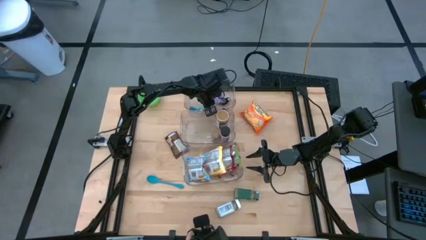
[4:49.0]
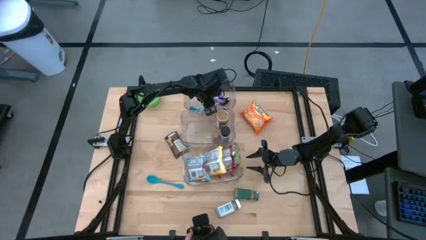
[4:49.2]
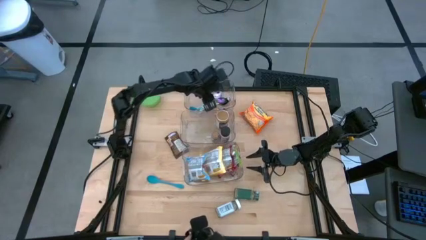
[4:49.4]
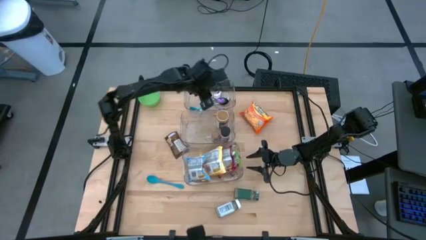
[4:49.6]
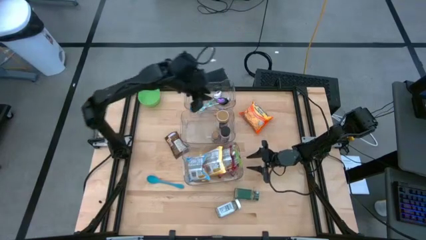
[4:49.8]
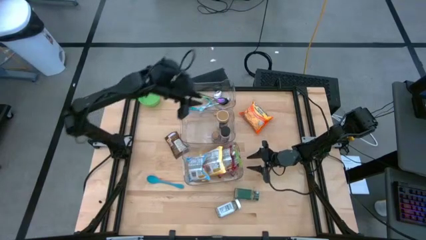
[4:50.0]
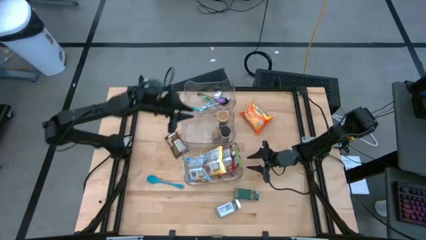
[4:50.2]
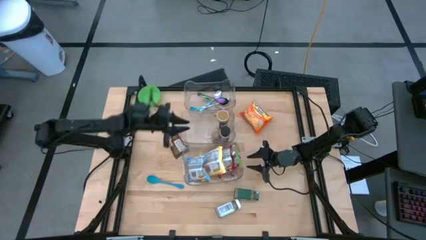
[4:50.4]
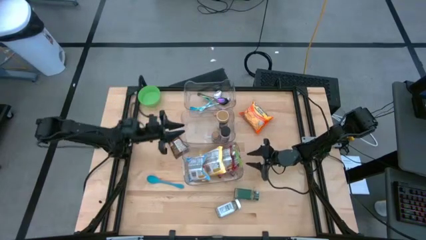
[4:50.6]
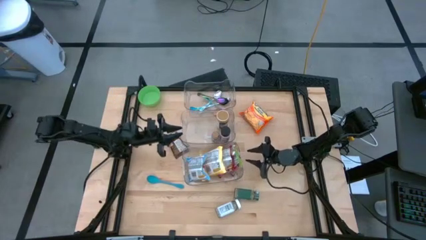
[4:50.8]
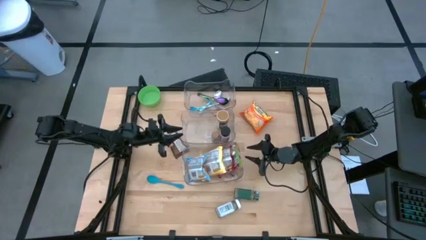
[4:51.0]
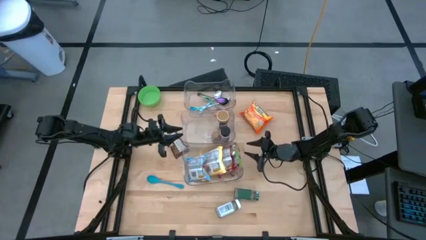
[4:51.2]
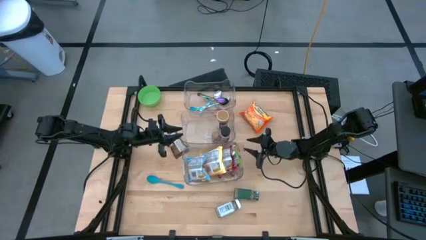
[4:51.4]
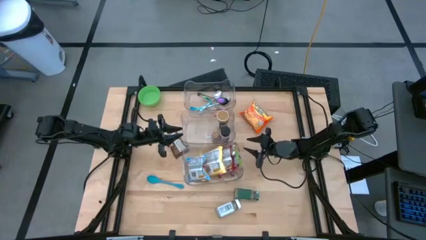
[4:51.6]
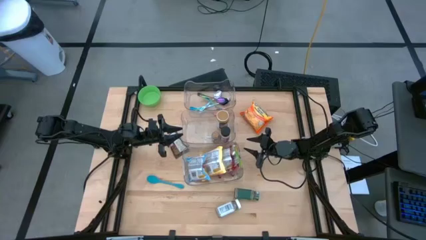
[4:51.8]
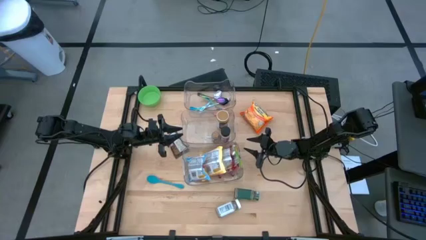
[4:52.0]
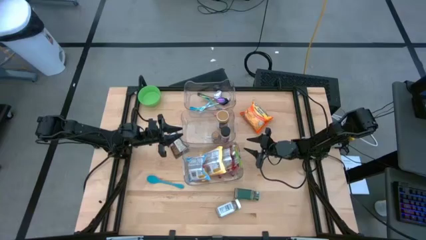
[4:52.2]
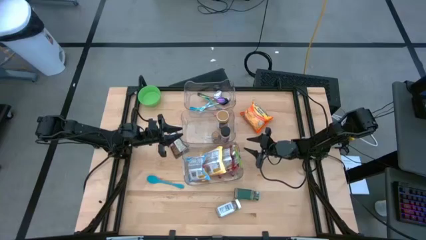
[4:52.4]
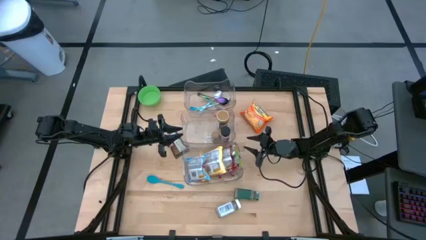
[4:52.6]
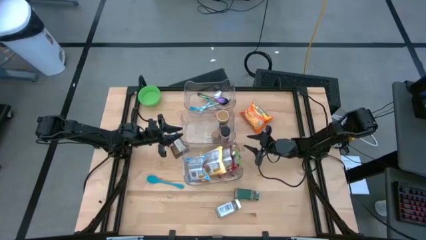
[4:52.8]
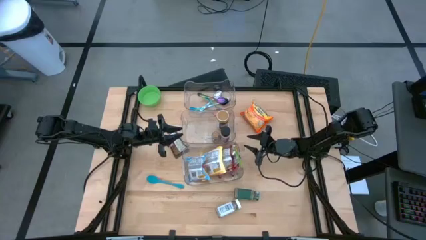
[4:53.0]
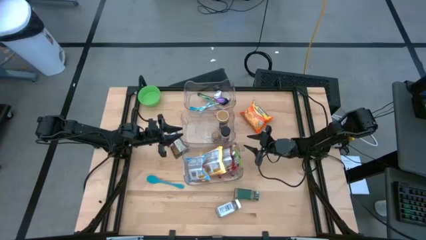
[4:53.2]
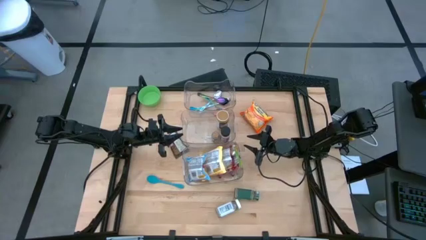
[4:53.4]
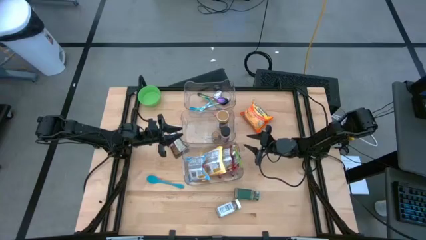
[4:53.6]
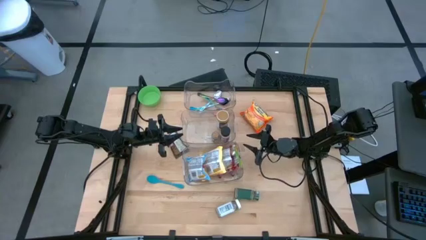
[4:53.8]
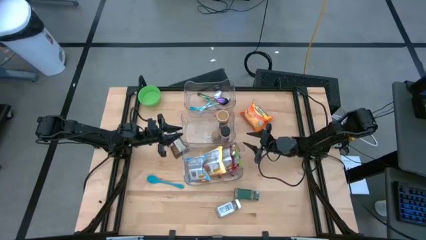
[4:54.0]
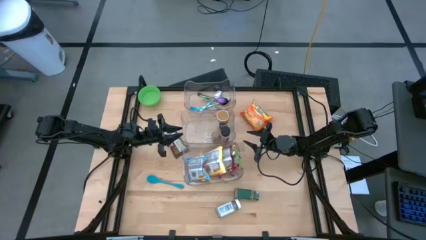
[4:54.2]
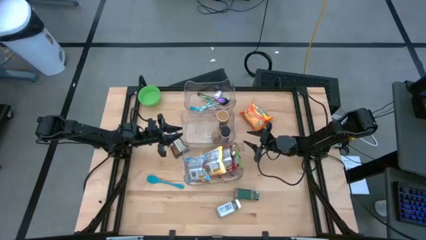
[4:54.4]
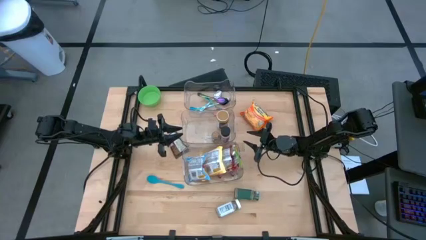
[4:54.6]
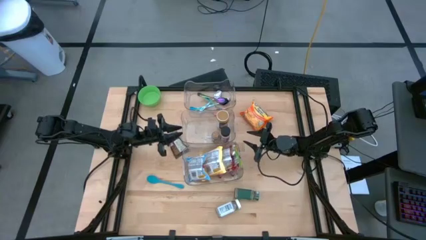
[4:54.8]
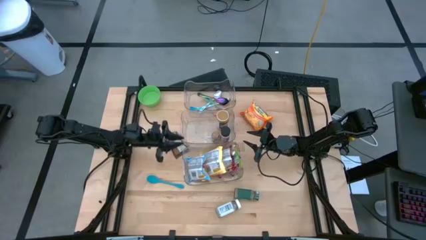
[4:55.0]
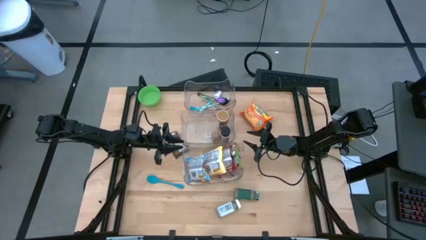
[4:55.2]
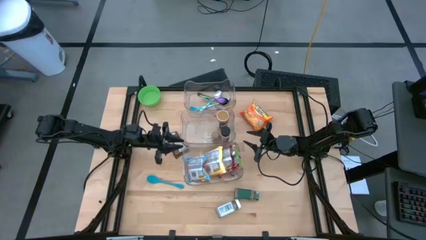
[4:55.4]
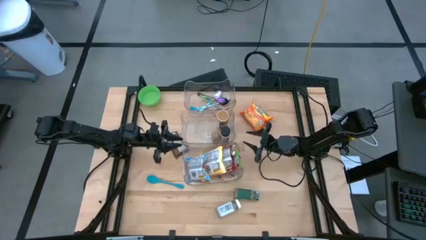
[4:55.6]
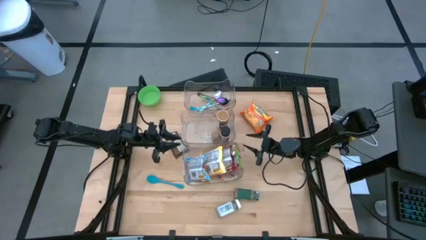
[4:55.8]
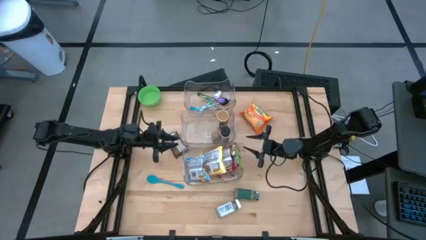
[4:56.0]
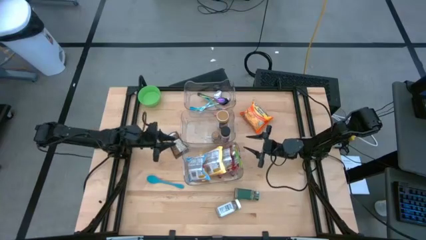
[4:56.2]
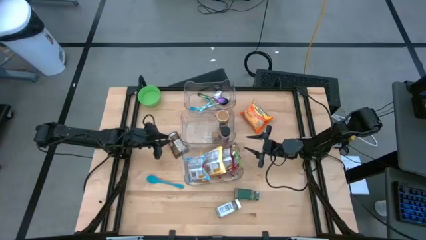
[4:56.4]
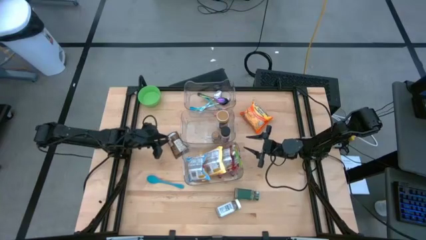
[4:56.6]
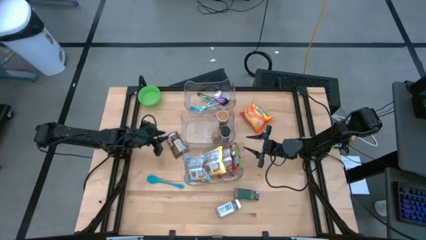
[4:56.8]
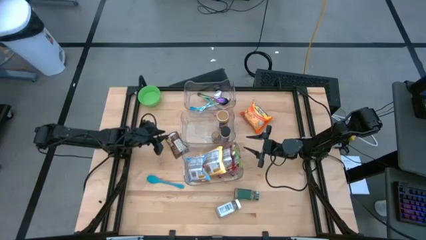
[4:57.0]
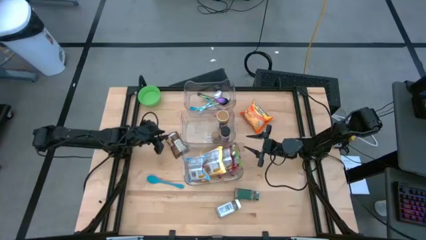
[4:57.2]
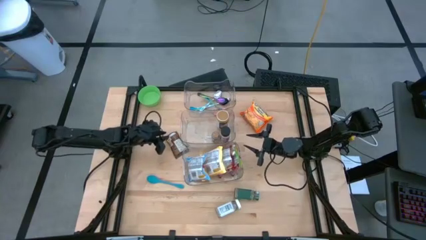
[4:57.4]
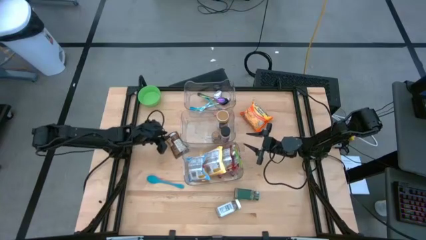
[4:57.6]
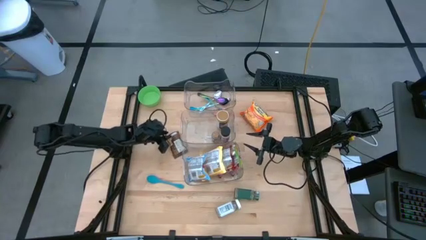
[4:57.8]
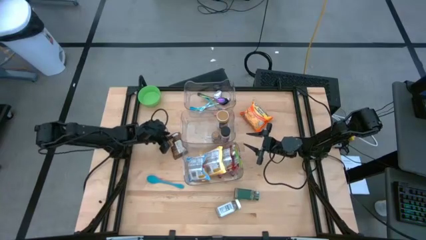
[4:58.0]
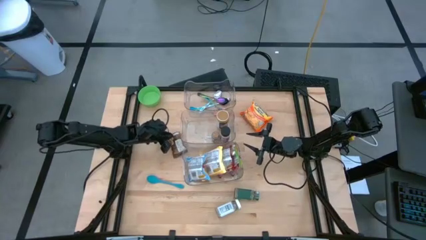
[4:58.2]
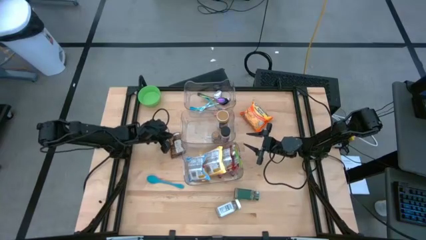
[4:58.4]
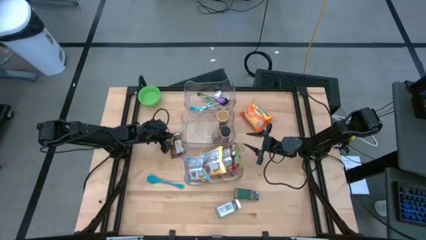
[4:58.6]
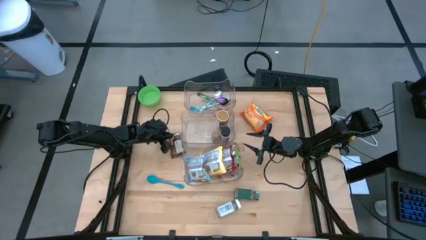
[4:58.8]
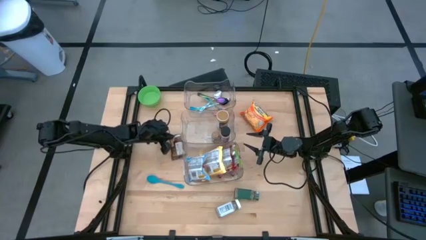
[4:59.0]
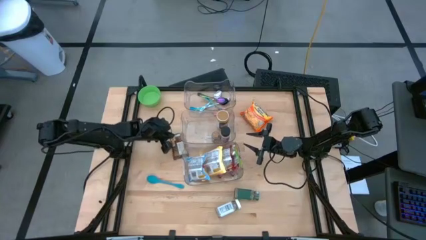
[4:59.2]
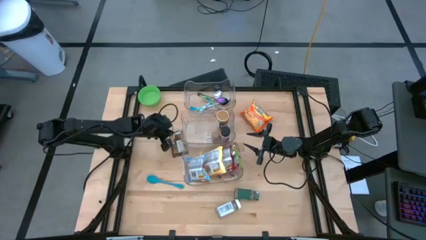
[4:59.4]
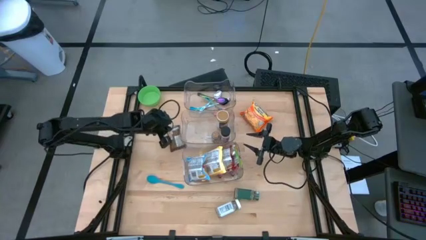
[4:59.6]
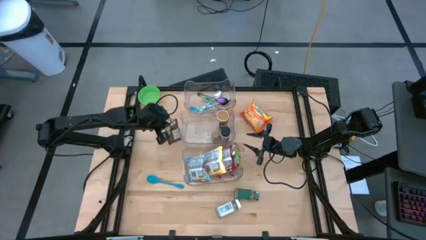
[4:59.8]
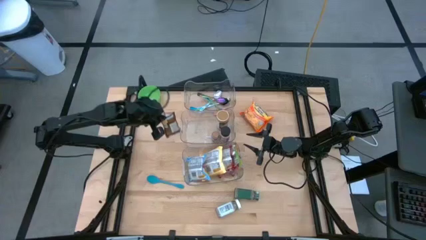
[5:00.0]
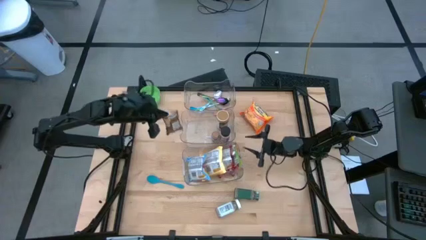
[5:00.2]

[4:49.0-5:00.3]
Task: Pick & Place Food Item
Put the orange seasoning packet into the middle transparent bin

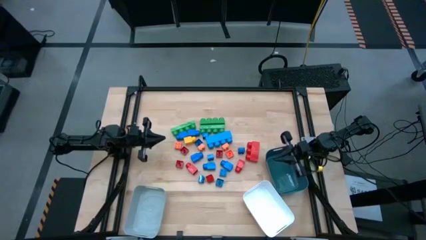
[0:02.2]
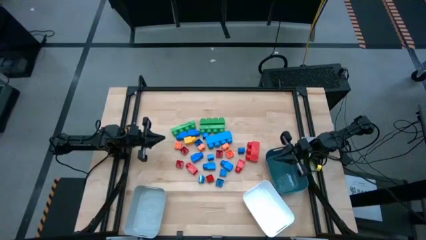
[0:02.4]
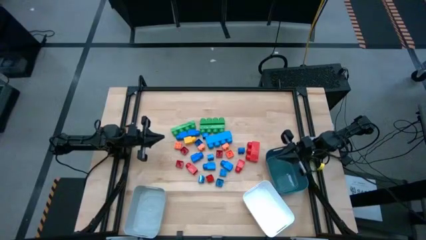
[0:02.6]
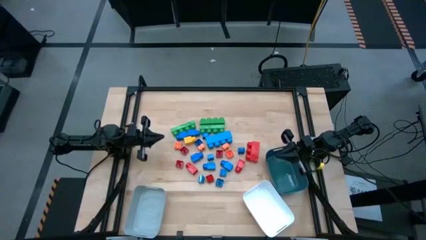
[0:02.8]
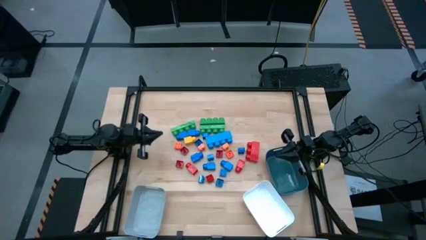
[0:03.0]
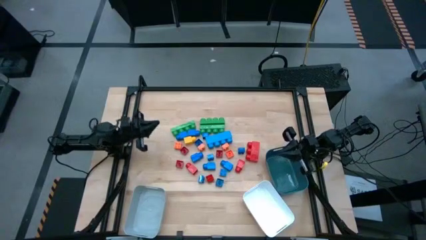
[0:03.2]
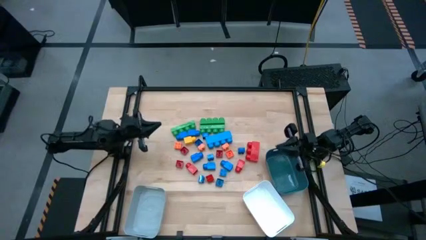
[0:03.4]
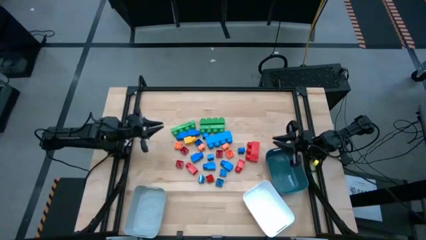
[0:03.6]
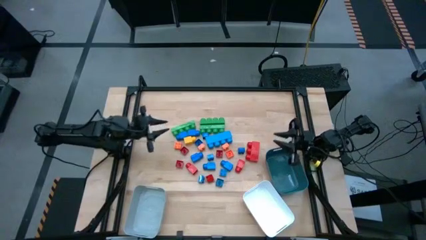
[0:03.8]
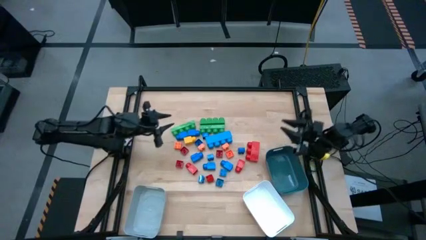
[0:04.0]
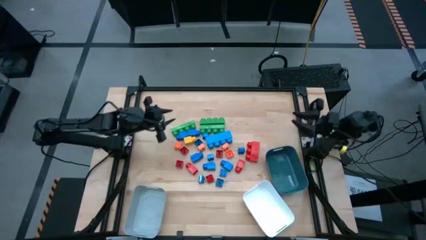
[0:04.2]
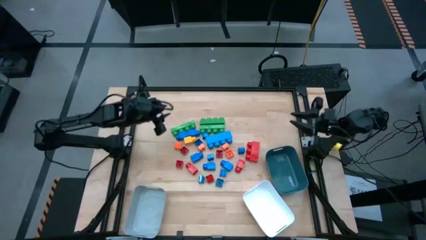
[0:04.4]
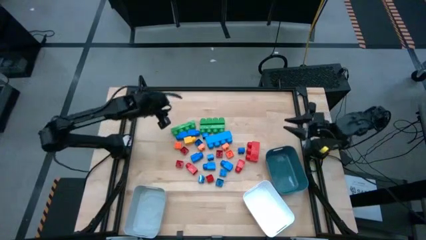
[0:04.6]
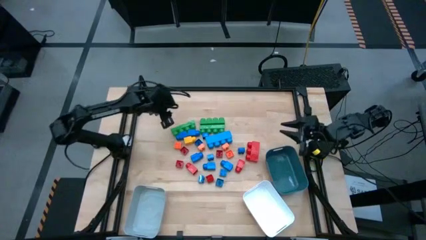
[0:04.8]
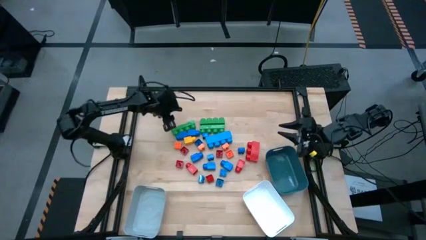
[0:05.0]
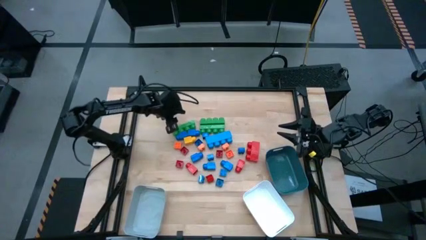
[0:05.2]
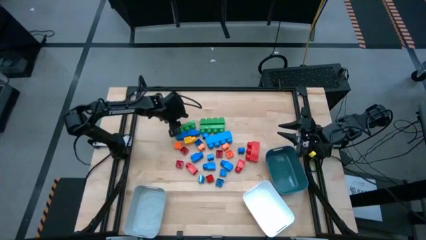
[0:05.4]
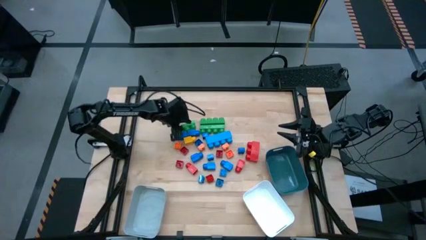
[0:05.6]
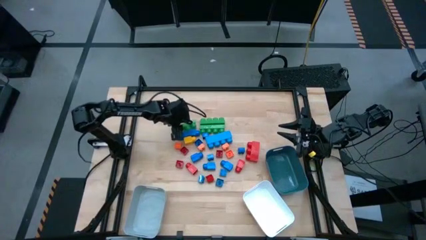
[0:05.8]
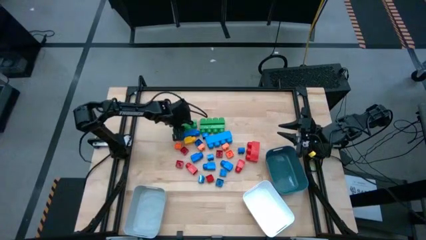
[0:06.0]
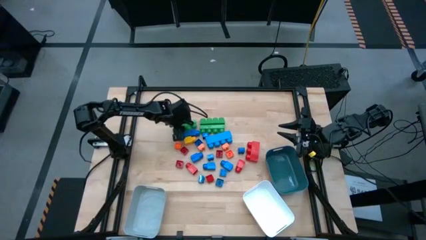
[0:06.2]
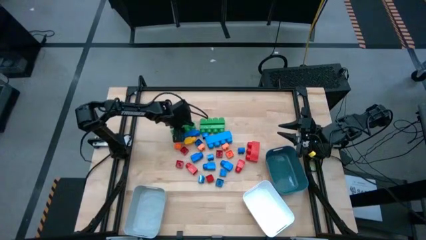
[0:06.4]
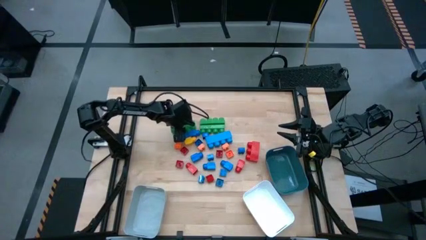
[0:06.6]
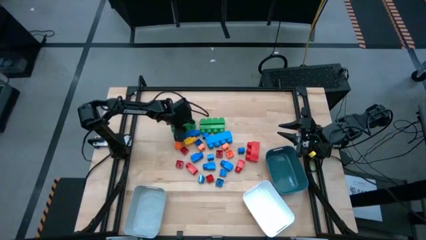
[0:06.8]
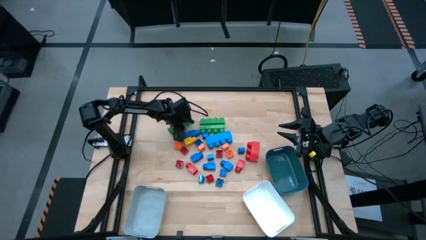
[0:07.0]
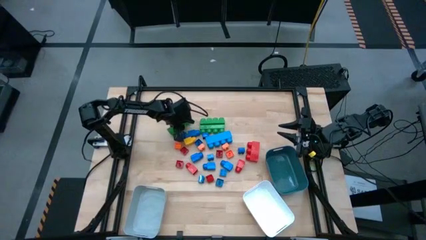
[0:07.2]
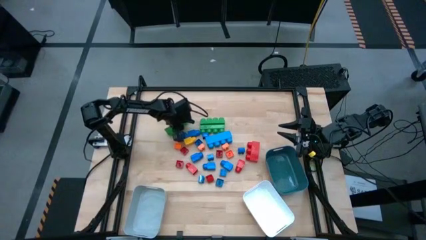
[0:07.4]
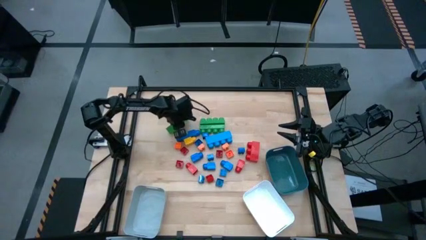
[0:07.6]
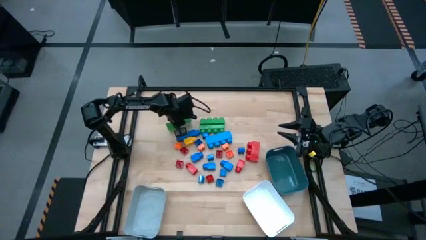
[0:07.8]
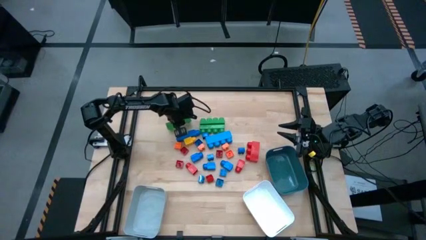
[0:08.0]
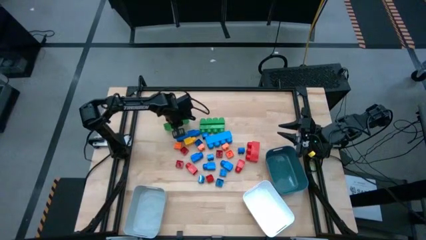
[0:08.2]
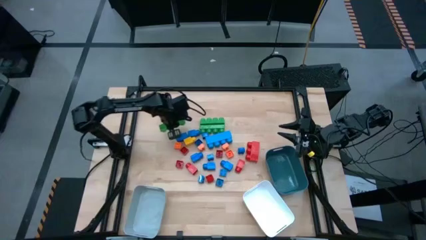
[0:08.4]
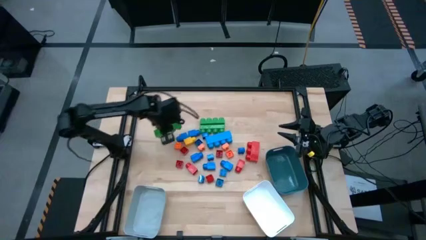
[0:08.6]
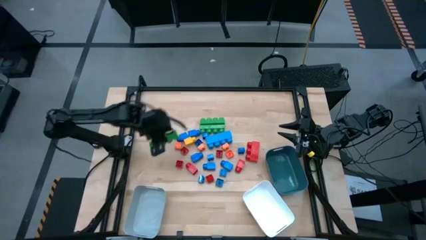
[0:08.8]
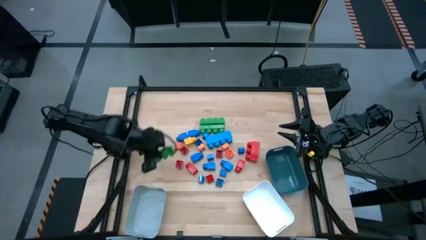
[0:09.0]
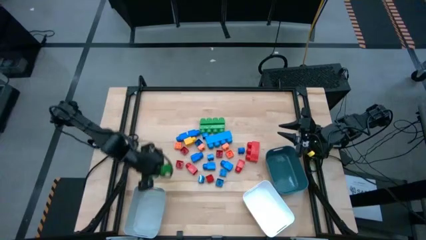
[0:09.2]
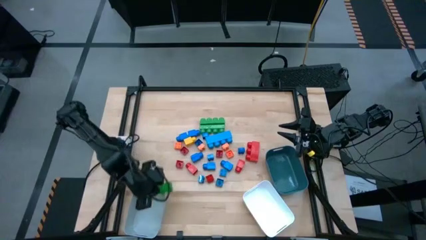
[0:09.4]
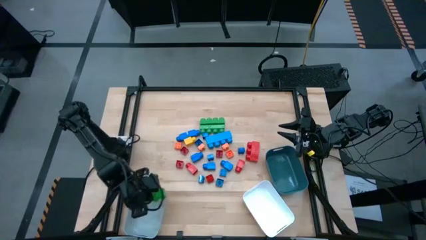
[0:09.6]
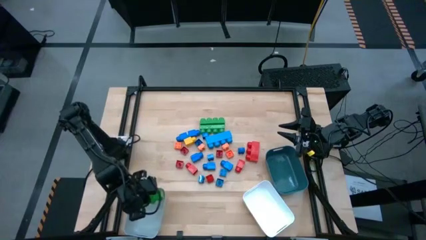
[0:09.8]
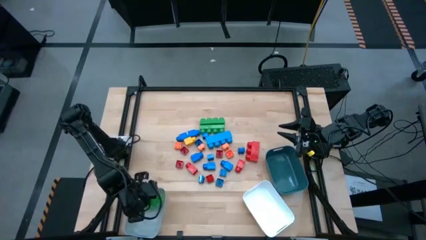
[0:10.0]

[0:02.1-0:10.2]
Task: Sort blocks by size
Put the rectangular green game piece into the gray bin
